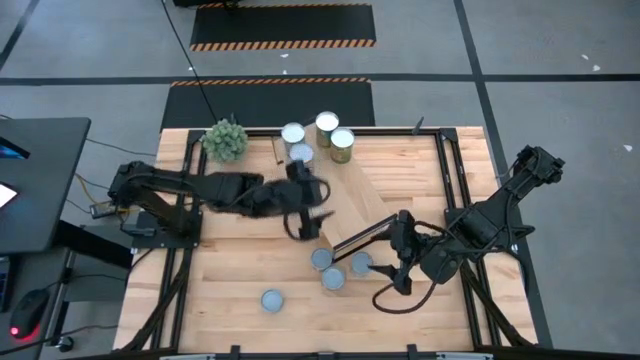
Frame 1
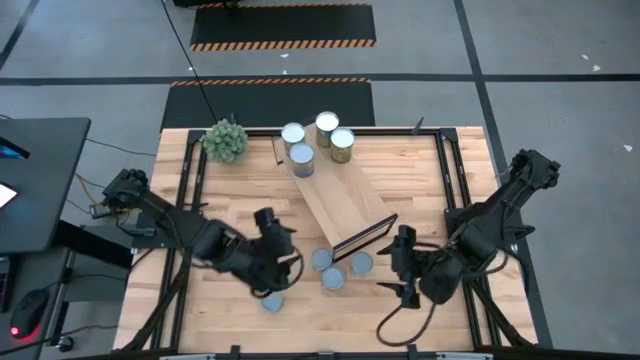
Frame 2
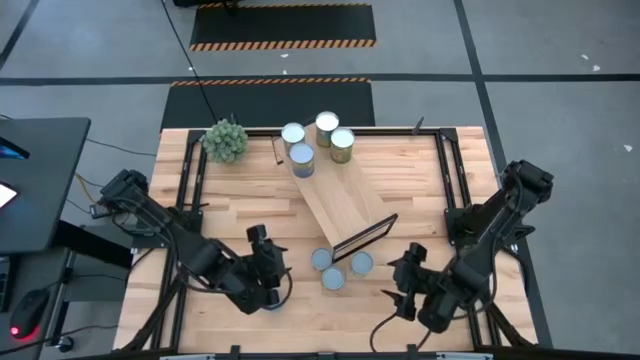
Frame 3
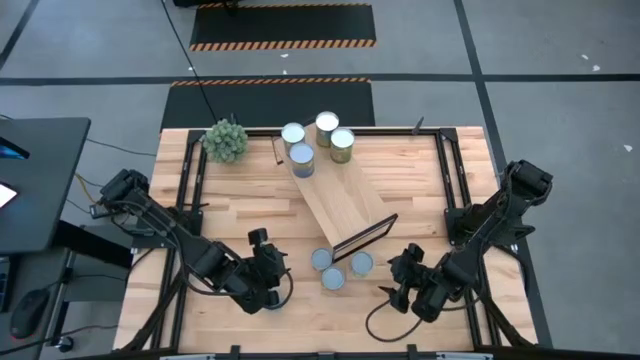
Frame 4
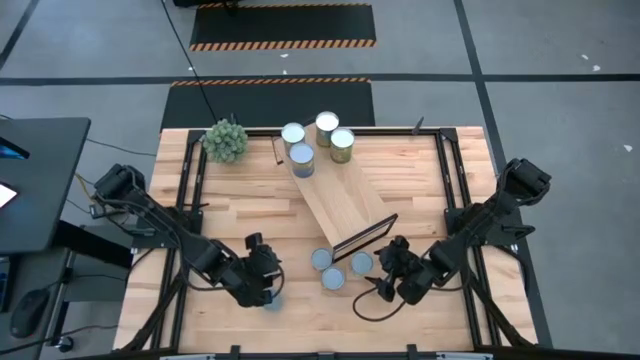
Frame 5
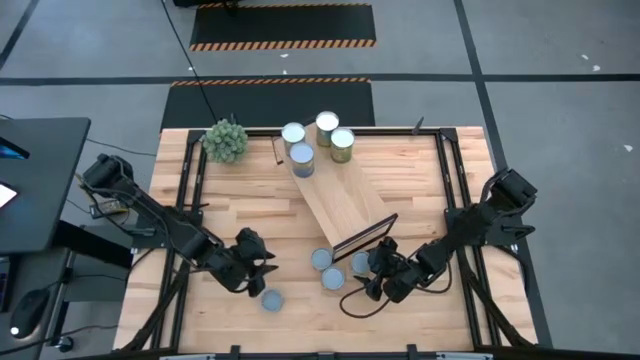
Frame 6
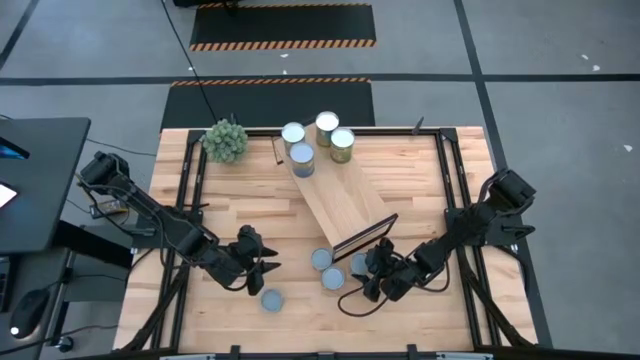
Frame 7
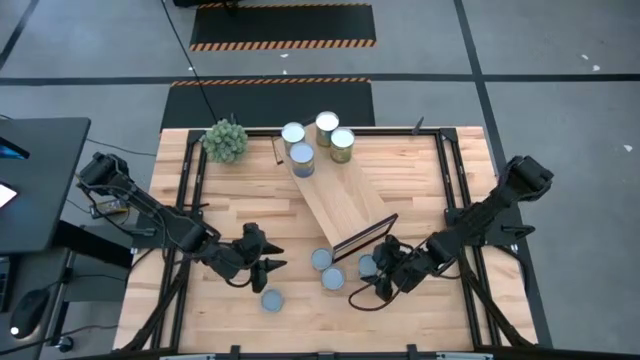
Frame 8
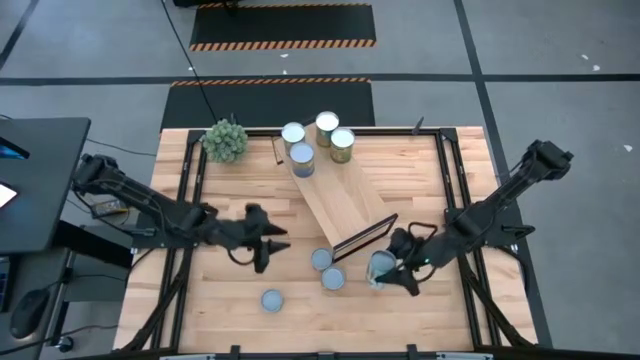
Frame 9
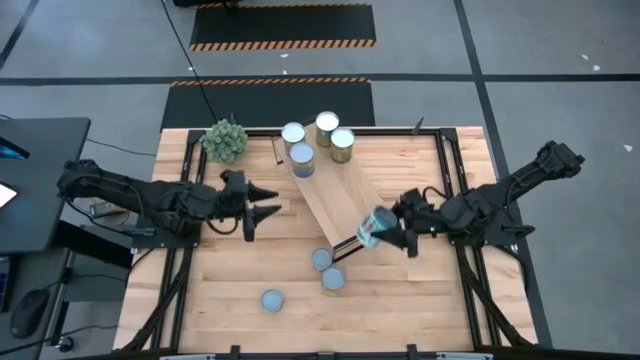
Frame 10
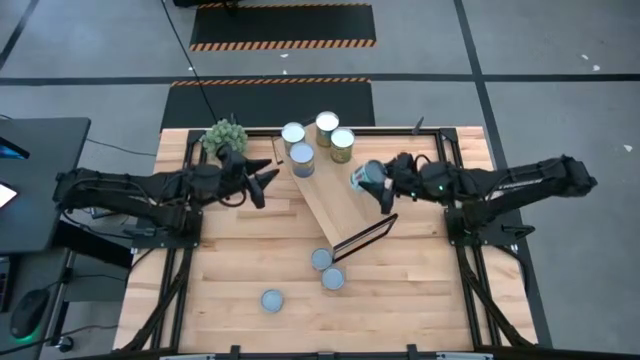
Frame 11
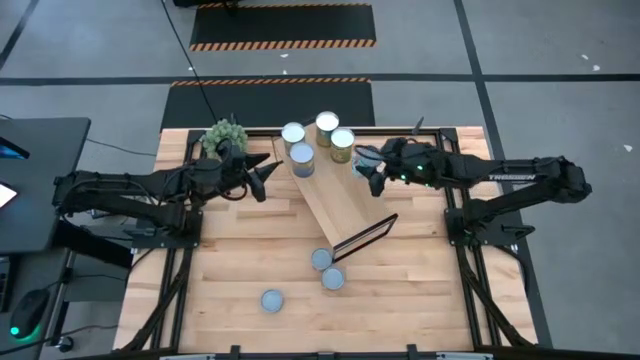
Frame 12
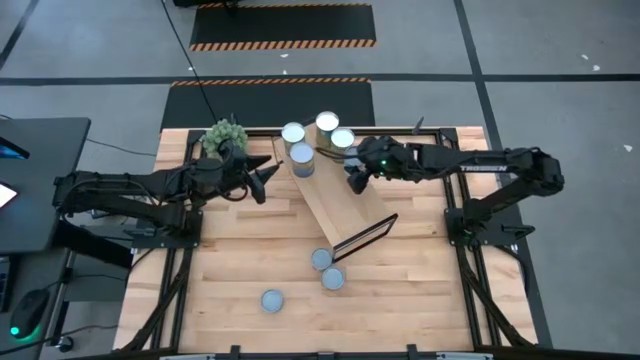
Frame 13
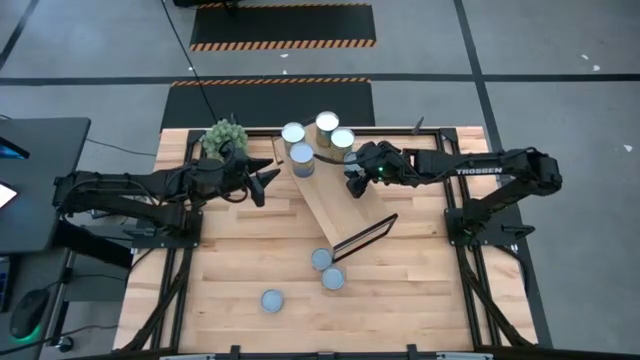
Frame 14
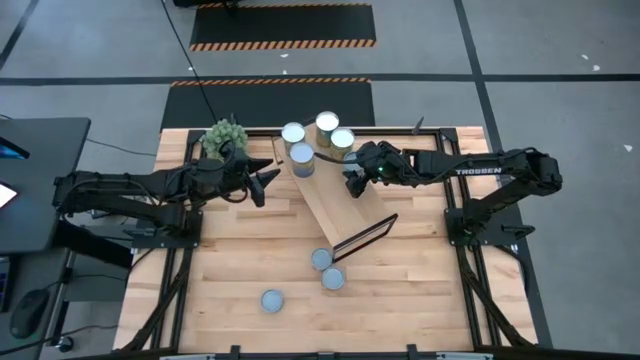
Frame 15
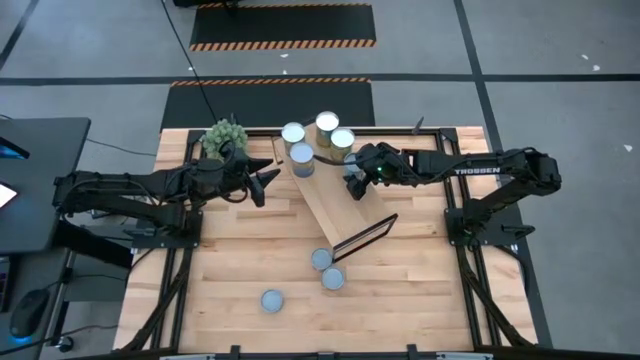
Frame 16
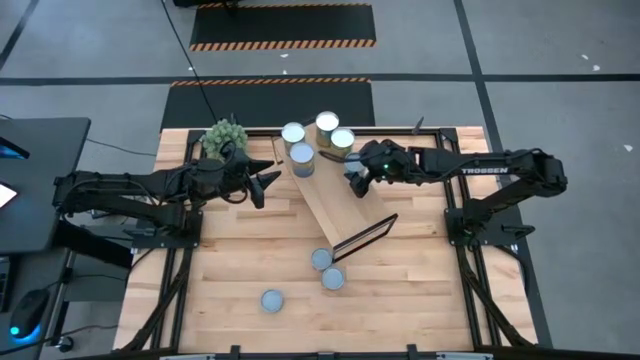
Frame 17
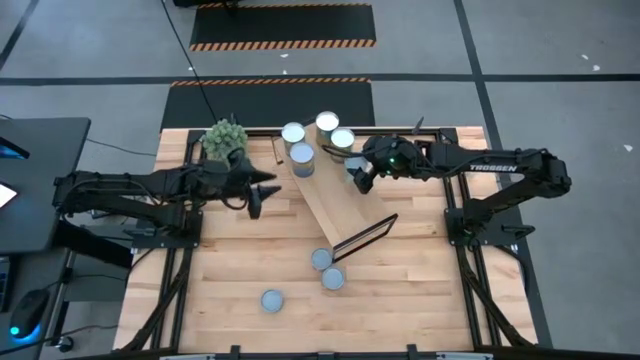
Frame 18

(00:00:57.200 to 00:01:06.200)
Task: Pick and place cans onto a shelf
Put the white-green can on the shelf

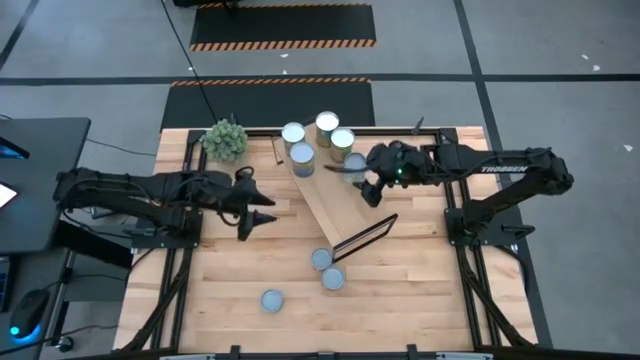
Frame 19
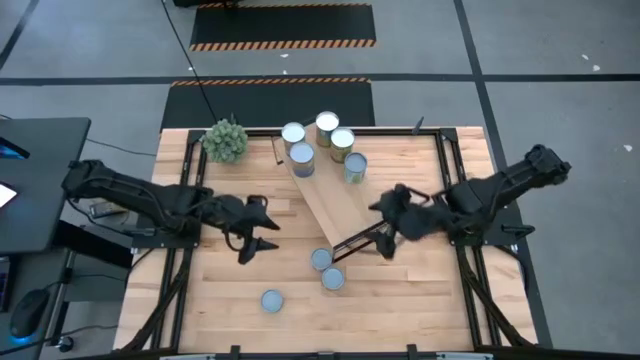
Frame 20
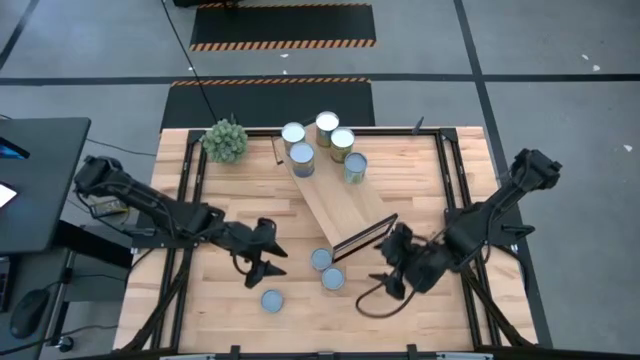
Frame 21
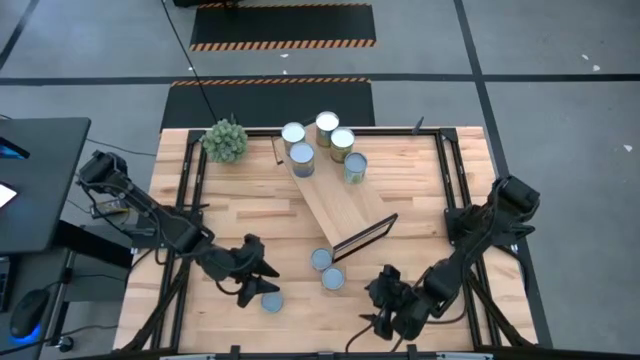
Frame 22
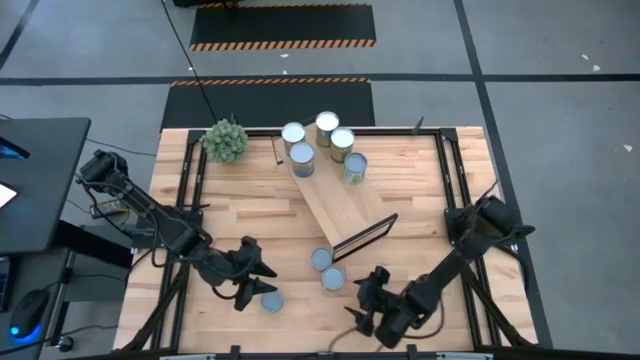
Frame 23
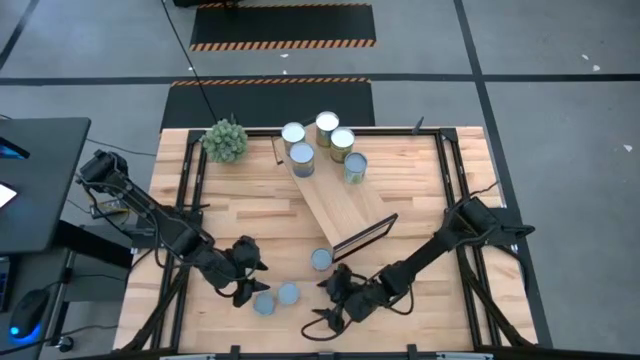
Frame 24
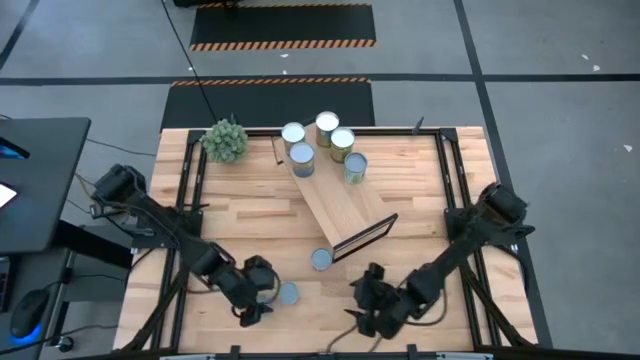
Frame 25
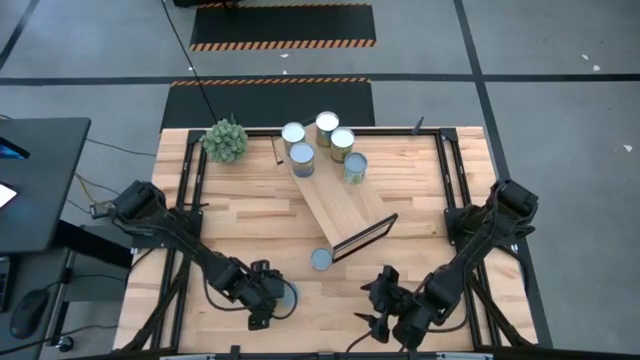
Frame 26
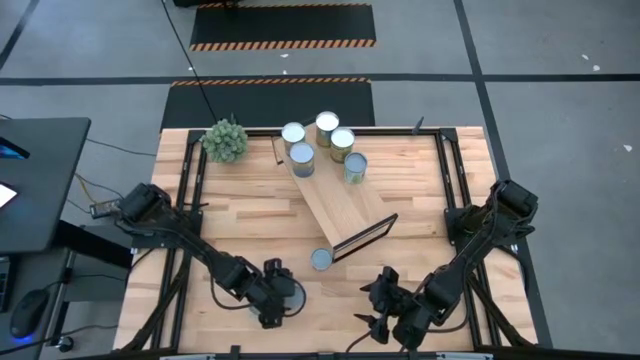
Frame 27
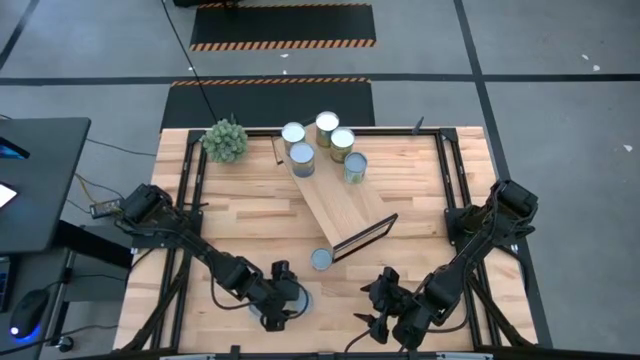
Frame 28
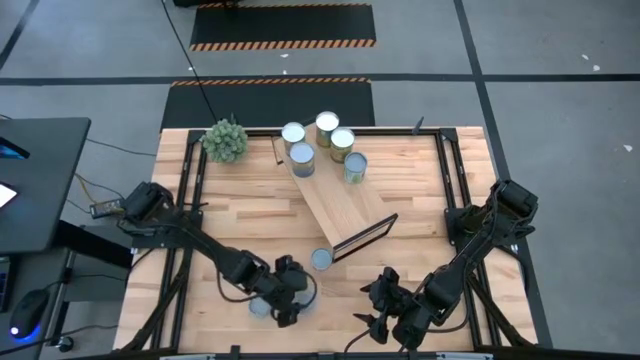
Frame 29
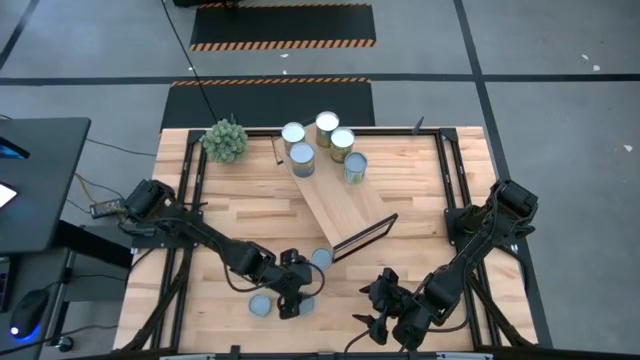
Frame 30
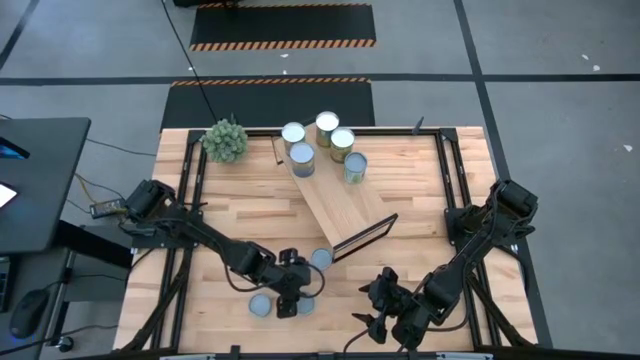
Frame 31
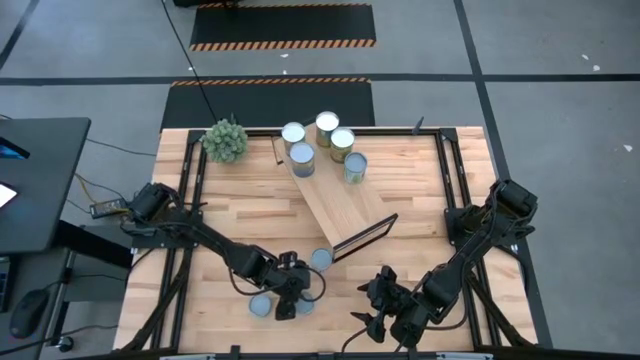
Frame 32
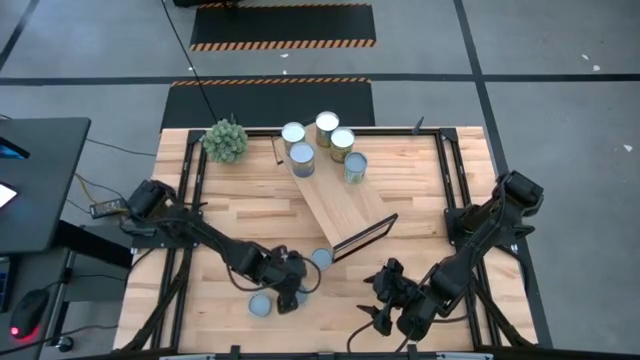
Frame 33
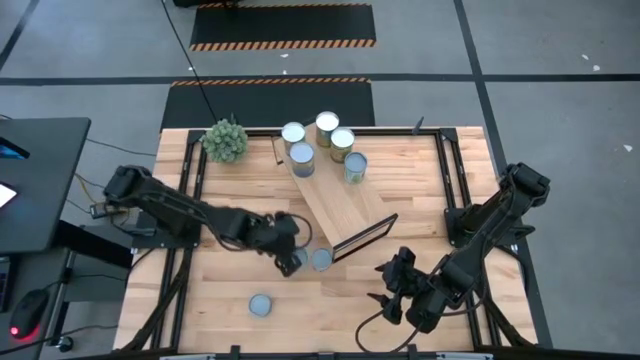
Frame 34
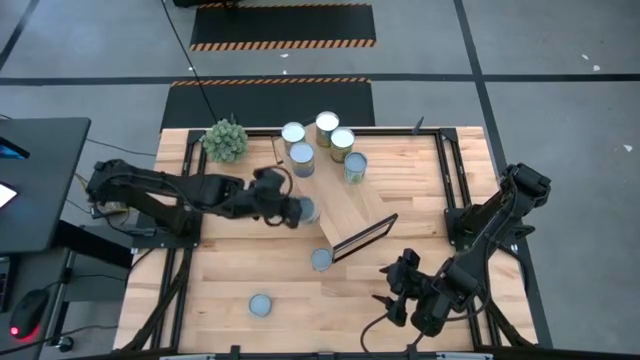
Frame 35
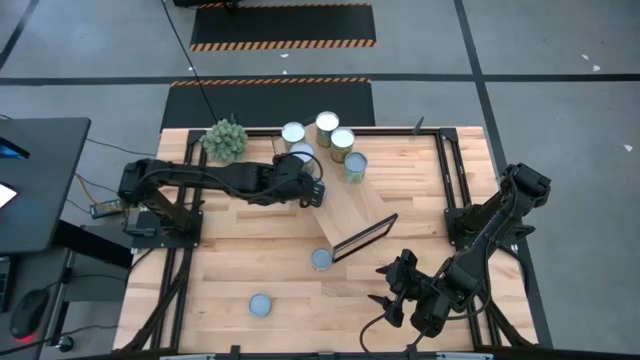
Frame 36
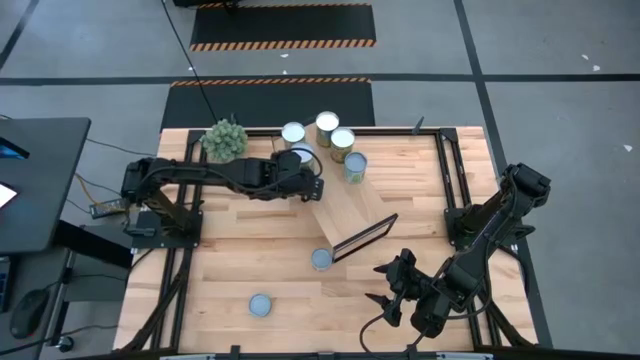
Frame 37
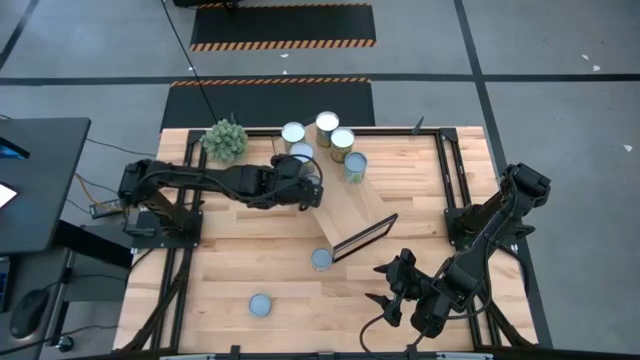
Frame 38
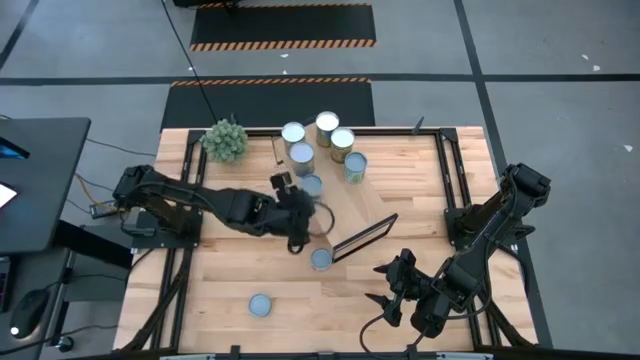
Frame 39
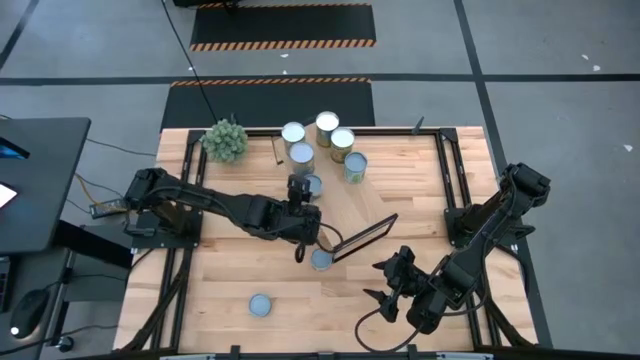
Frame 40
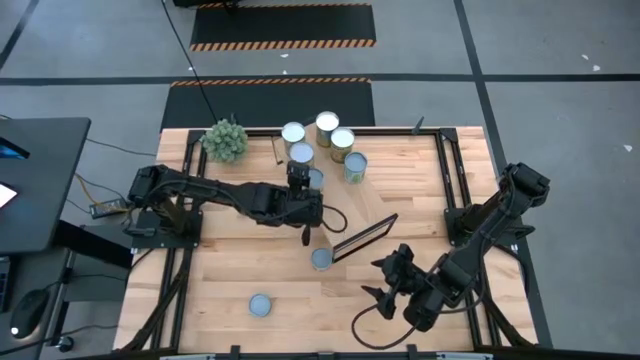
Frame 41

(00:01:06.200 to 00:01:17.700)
Put the green can on the shelf

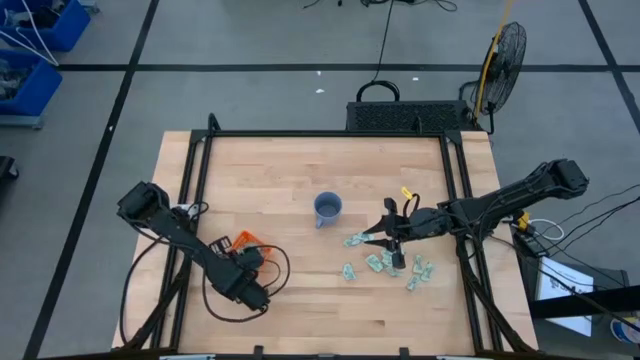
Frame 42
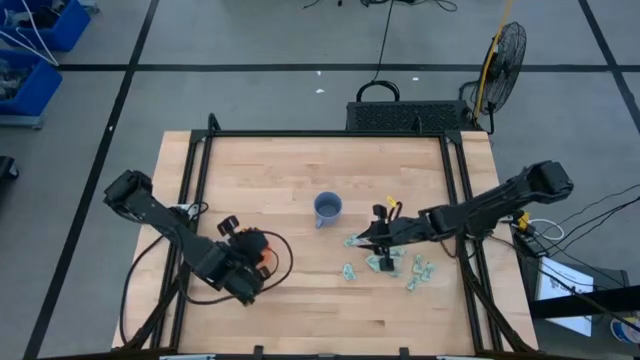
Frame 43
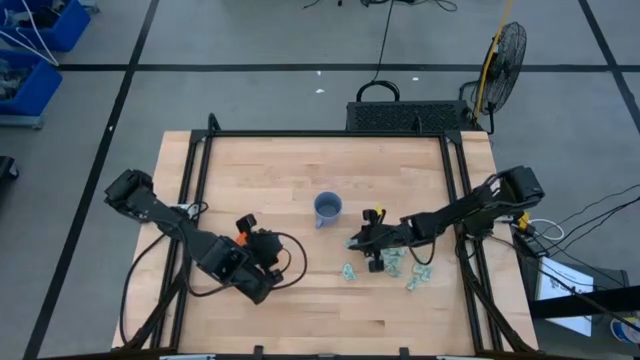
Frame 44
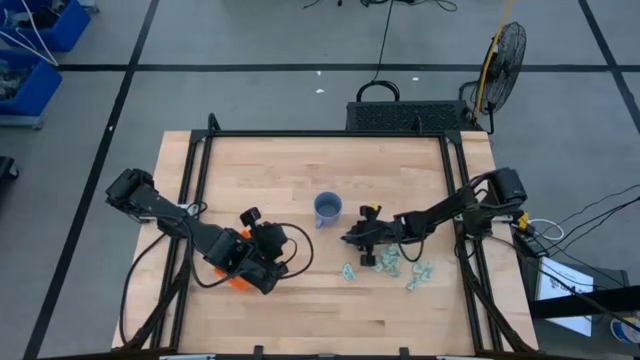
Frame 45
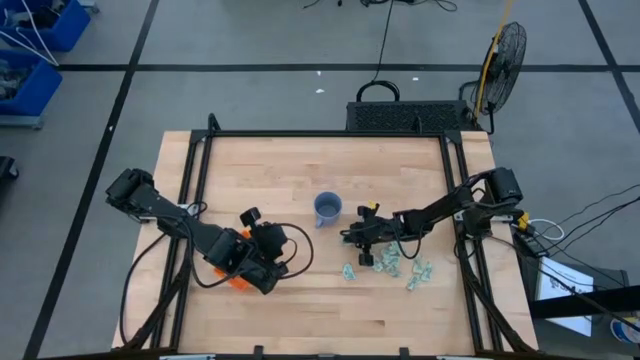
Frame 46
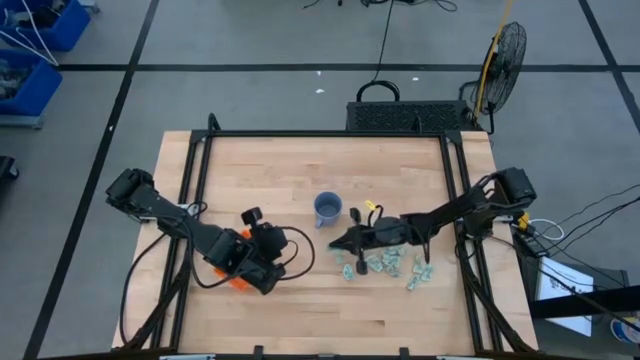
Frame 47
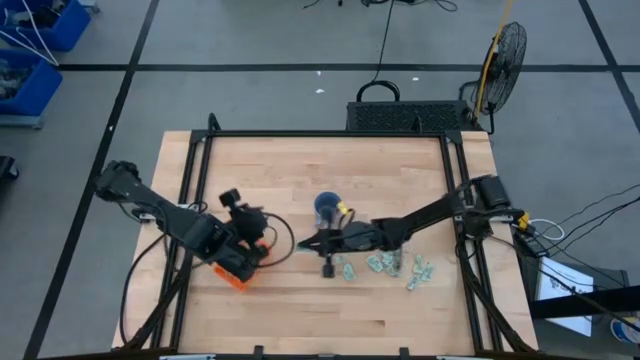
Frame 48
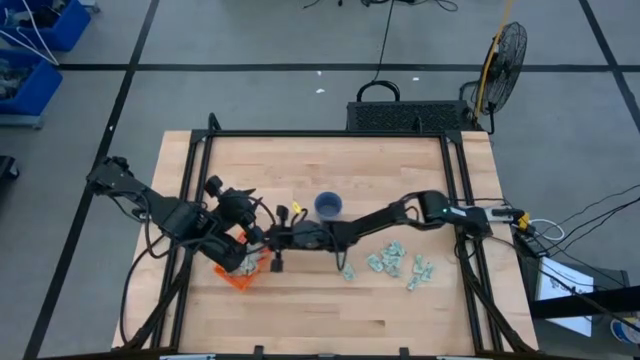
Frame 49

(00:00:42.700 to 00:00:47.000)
Task: Pick and place Stevia / Truvia into bins
Put the green stevia packet into the orange basket
